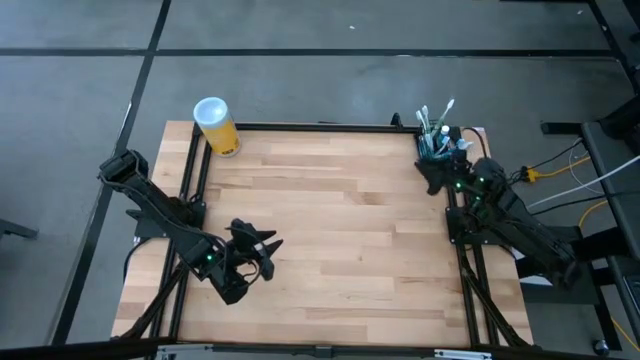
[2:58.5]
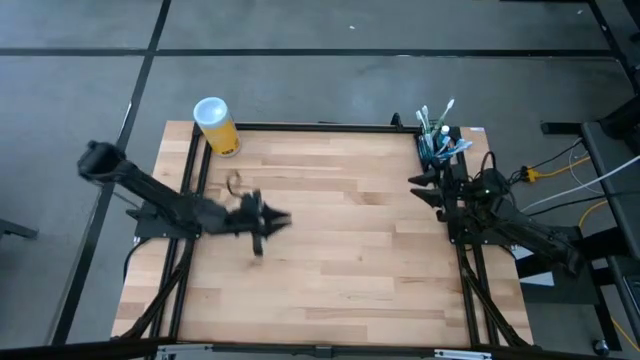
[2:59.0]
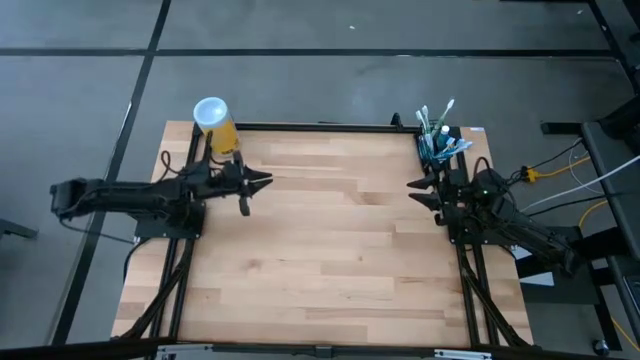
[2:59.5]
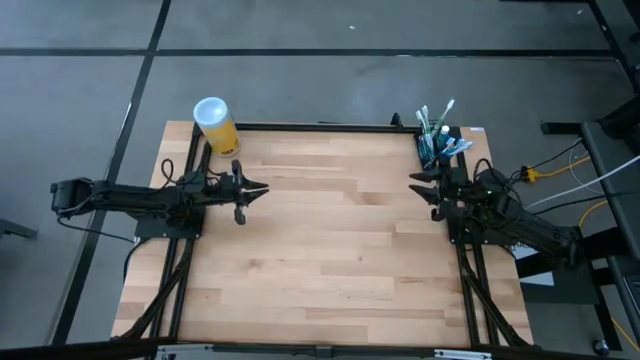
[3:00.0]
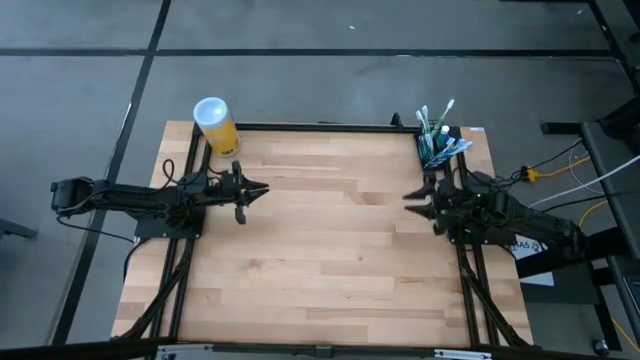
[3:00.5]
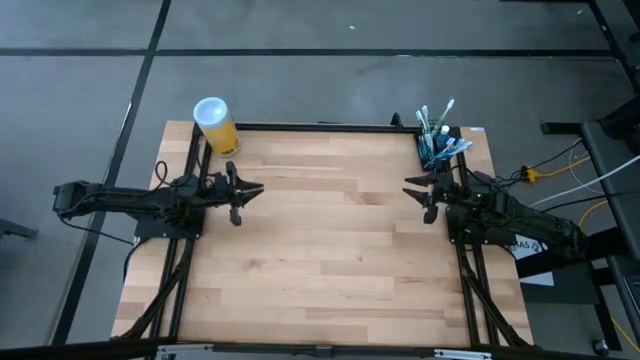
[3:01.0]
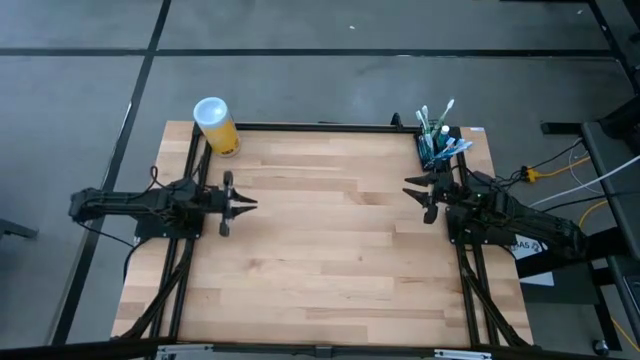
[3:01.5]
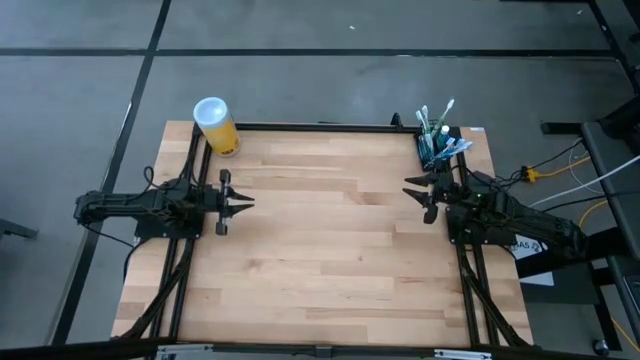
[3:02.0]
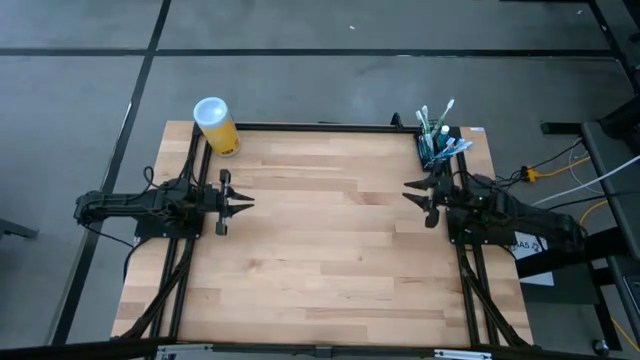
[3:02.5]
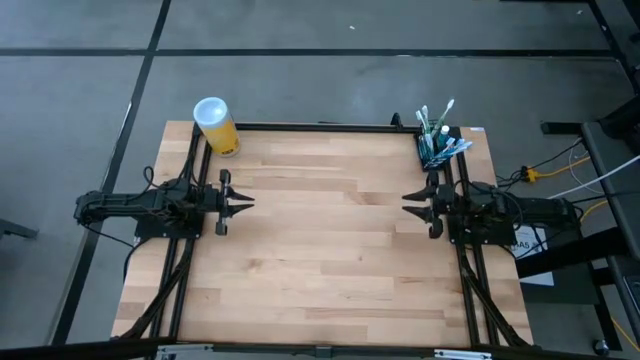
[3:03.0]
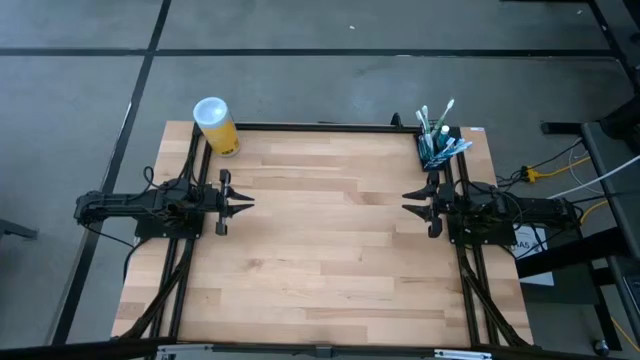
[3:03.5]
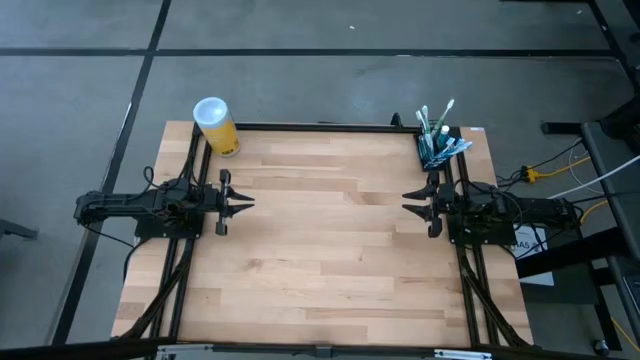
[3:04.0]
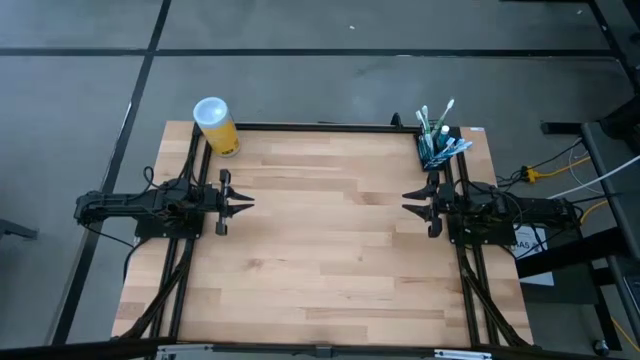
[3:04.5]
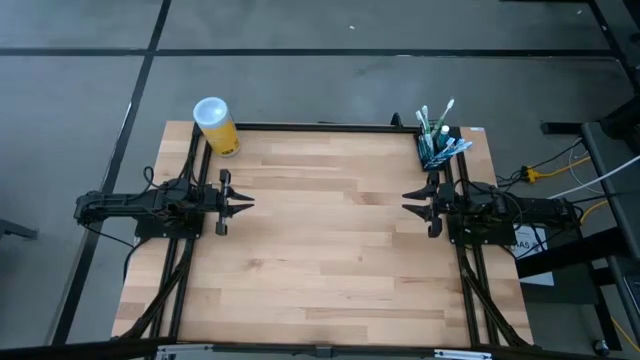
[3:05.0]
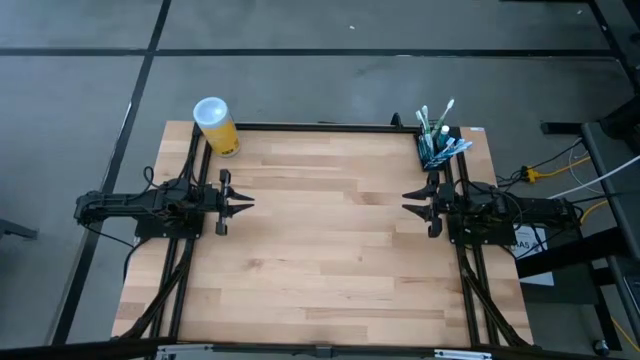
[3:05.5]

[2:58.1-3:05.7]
Task: Pick & Place toothbrushing station
Return to Home Position

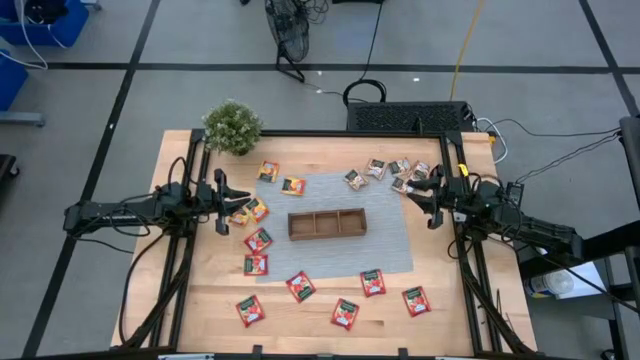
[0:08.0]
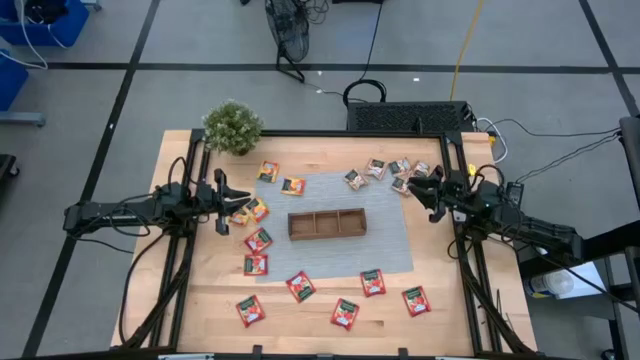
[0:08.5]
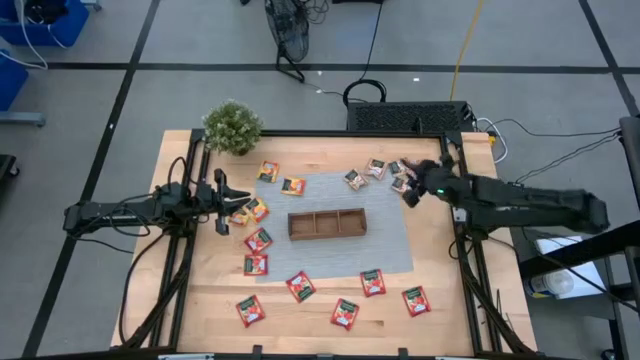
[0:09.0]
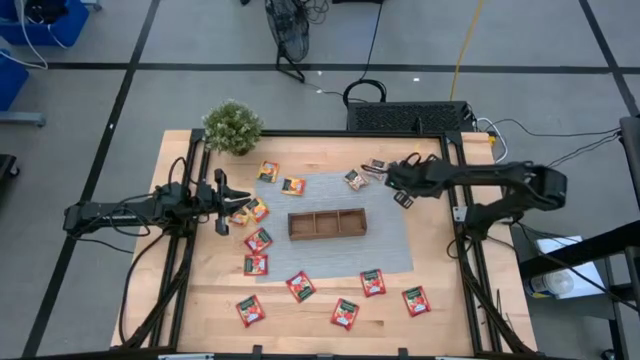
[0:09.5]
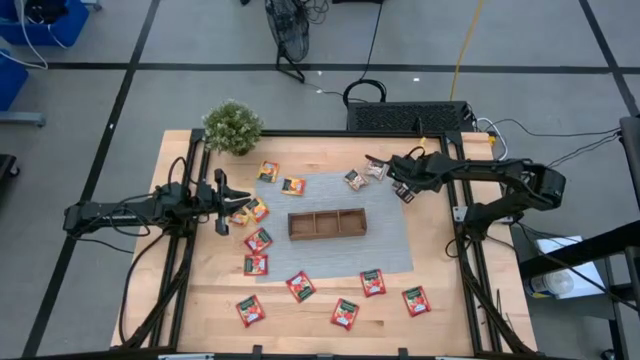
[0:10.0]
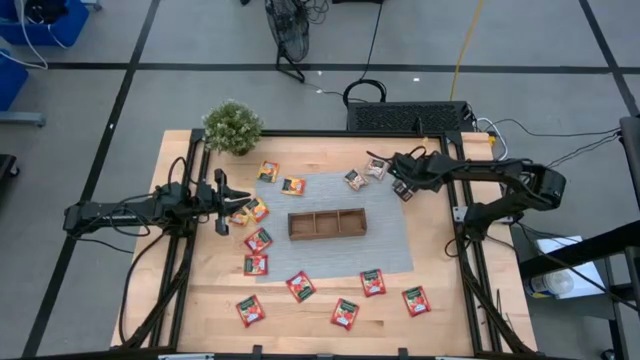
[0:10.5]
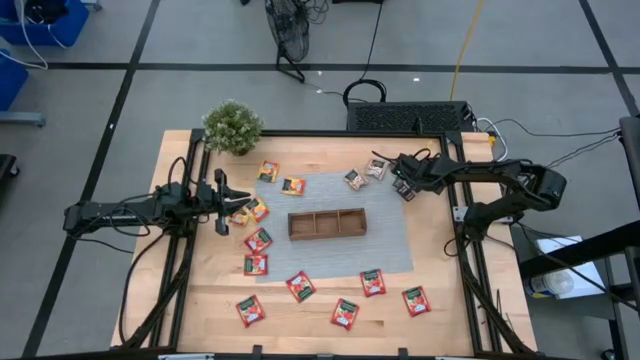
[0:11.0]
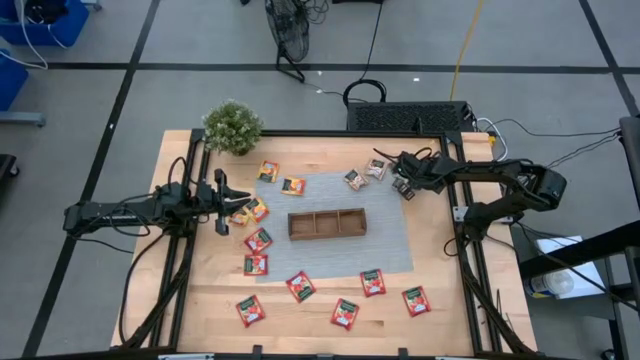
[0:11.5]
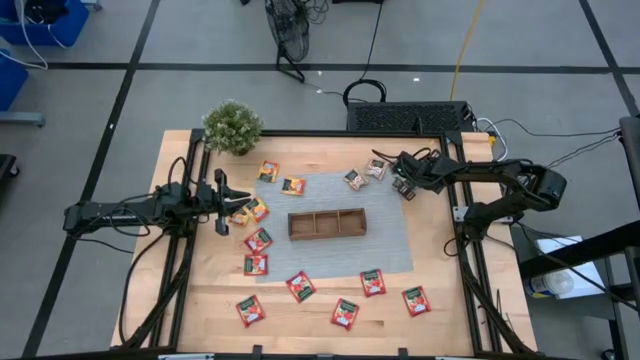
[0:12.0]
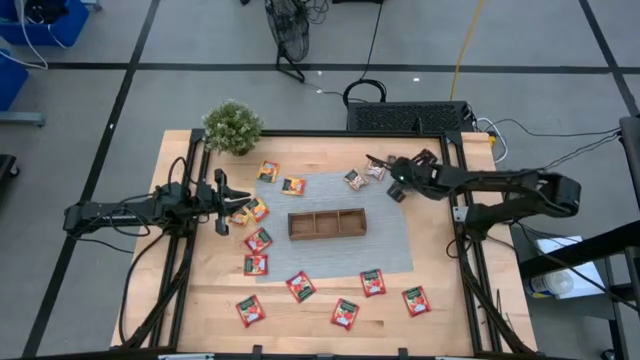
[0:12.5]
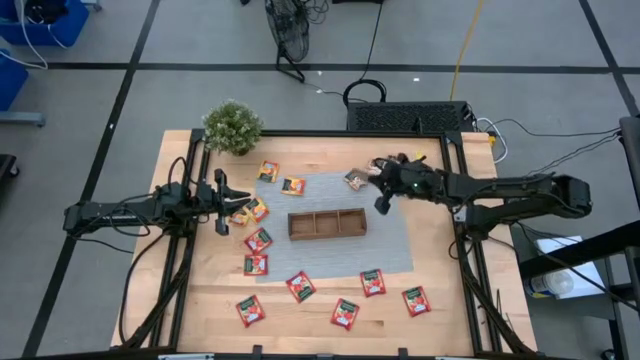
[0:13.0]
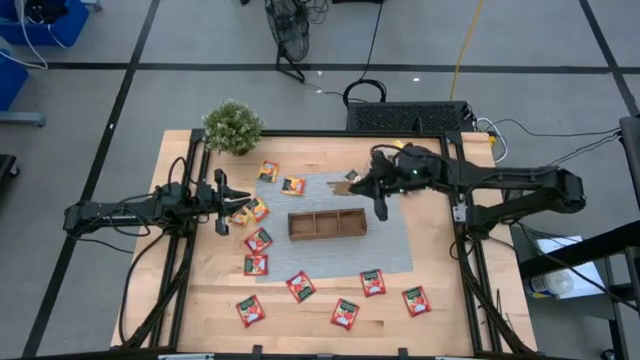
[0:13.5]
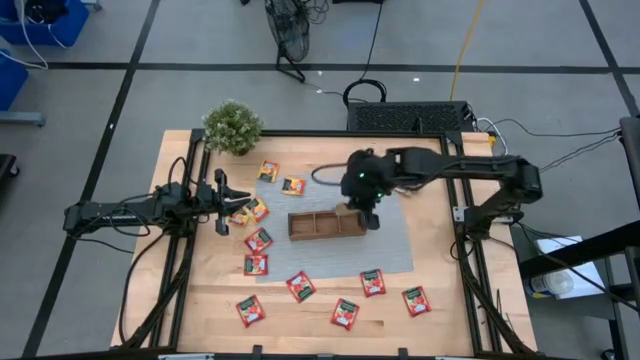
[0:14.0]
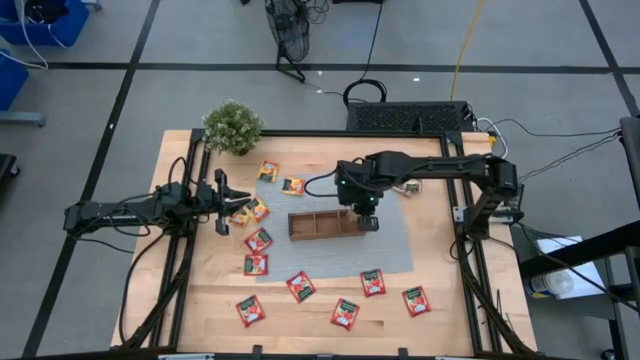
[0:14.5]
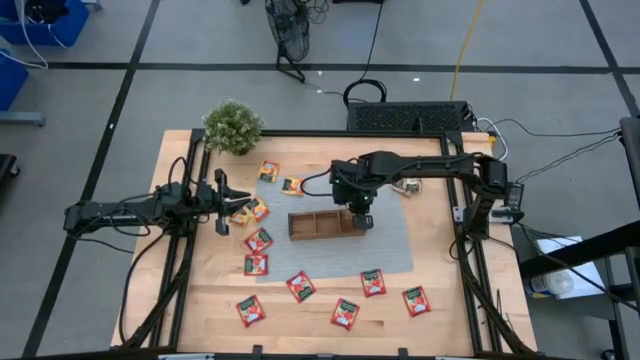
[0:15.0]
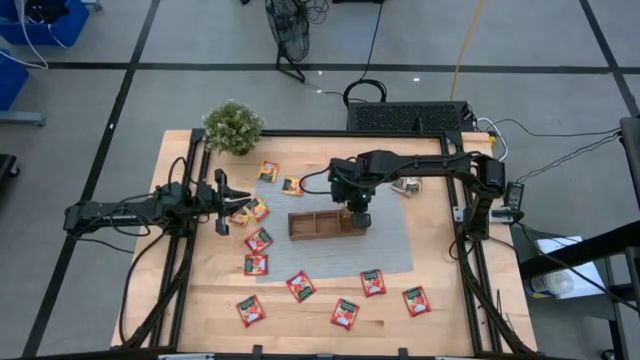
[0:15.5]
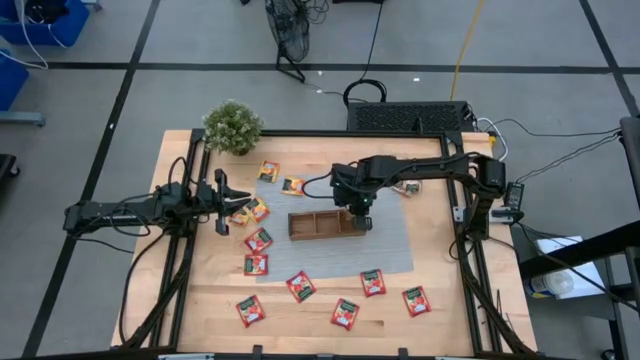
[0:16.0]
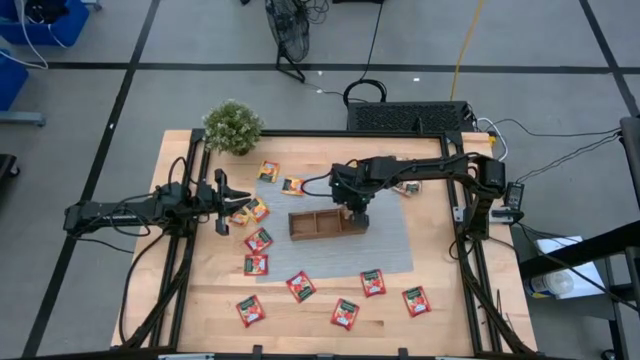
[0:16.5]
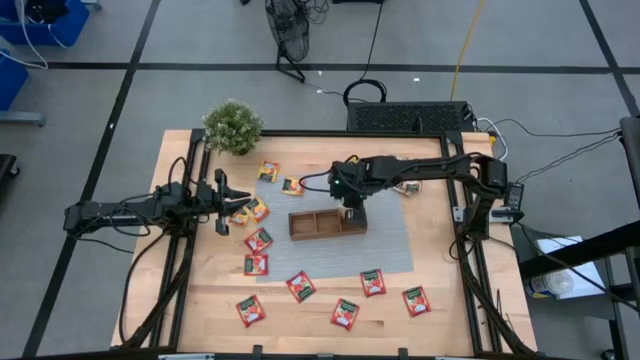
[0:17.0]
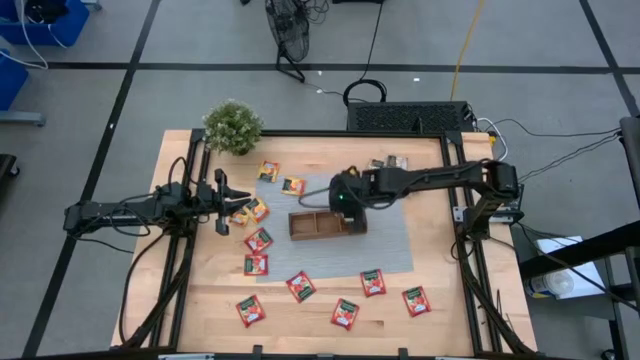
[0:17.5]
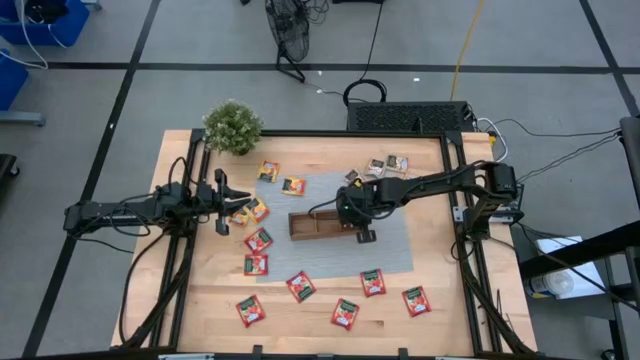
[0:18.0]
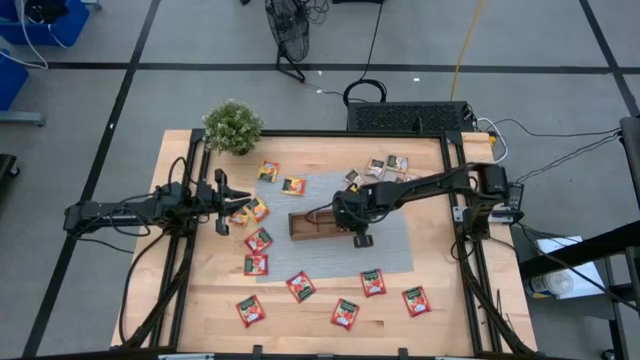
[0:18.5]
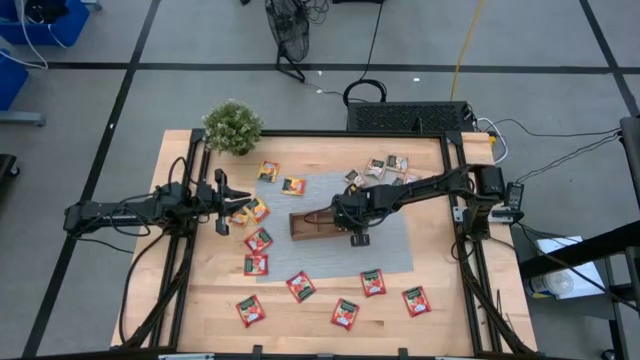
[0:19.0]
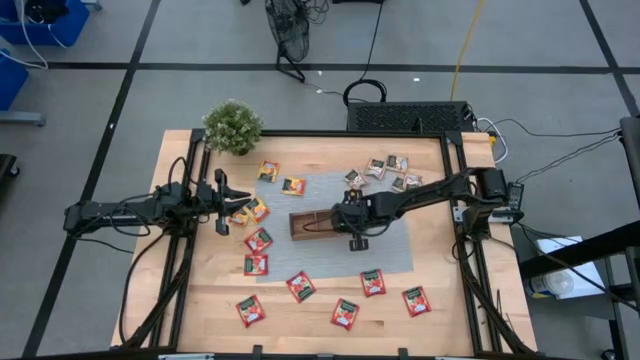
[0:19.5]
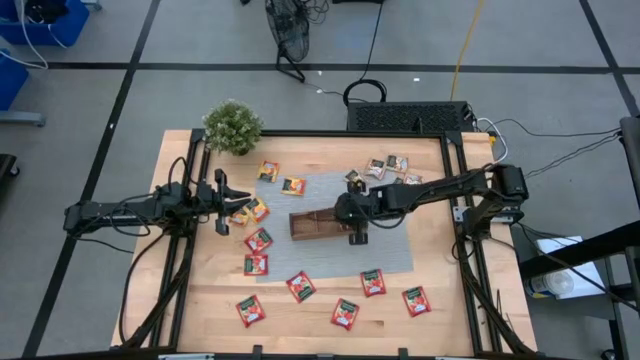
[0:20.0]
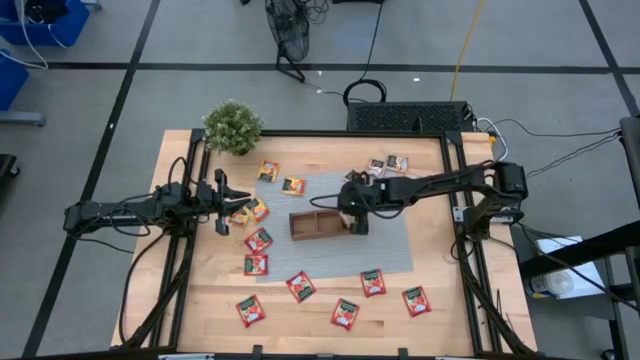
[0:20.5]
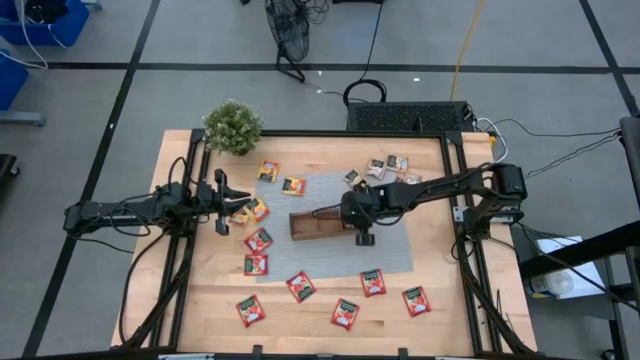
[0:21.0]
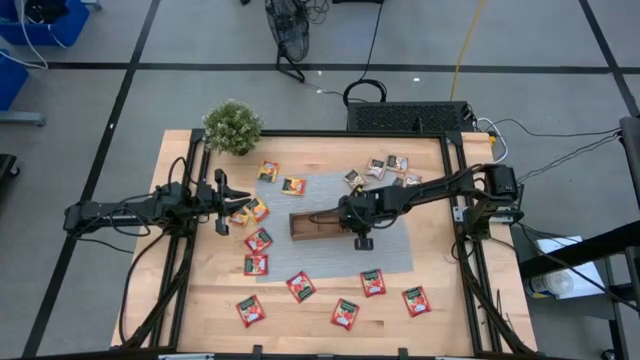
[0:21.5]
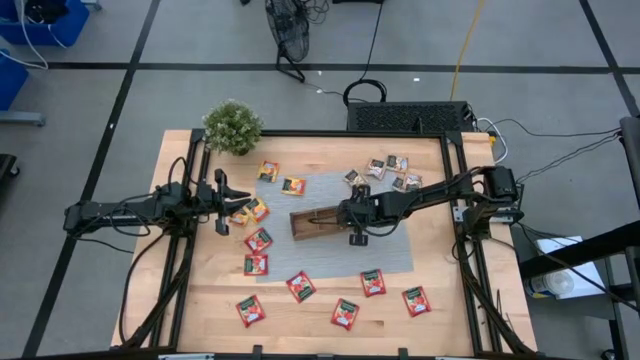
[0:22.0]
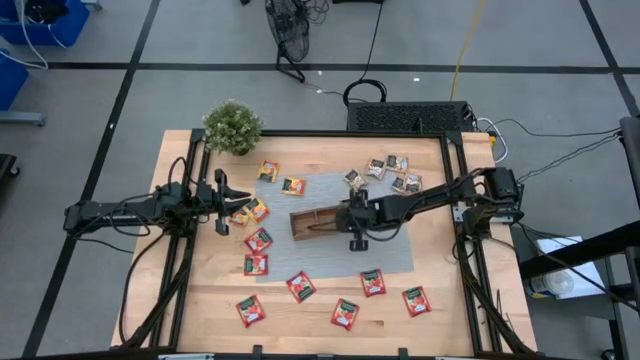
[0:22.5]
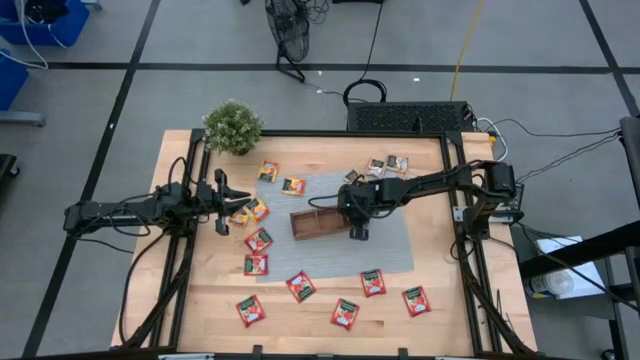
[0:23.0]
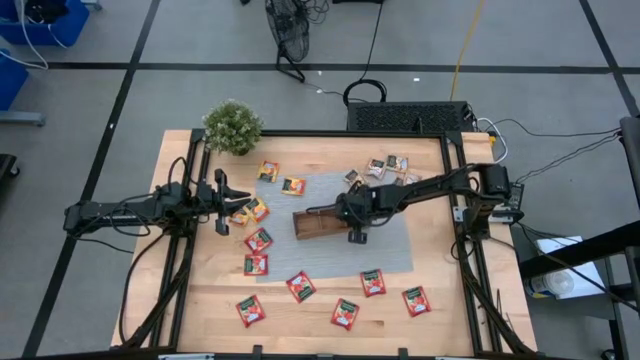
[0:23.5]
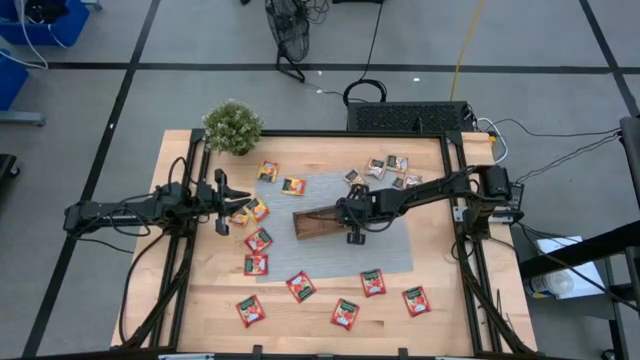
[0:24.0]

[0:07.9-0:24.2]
Task: Pick & Place Tea
Put the brown tea bag into the right section of the wooden organizer
